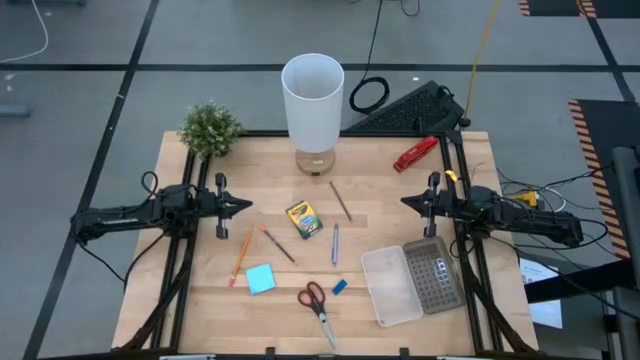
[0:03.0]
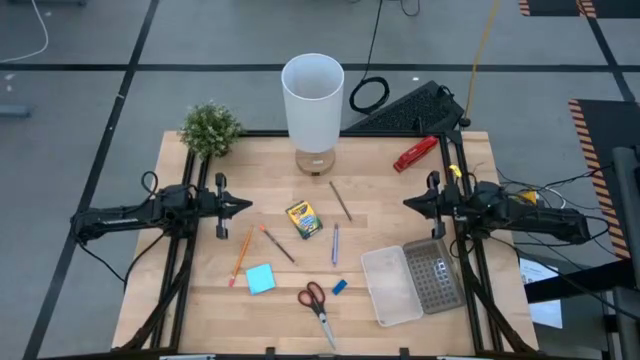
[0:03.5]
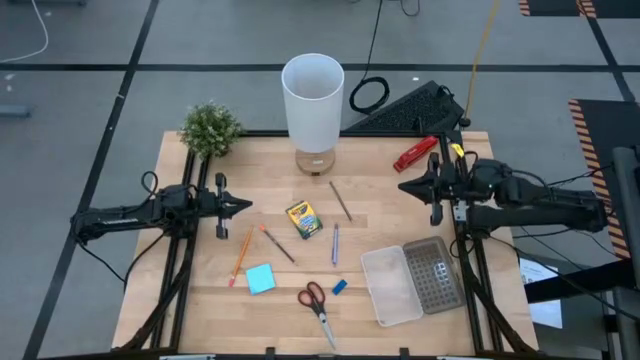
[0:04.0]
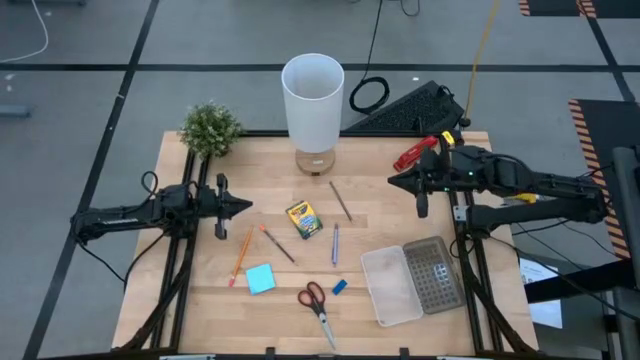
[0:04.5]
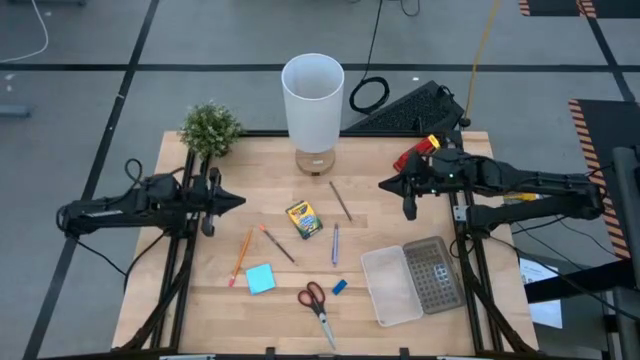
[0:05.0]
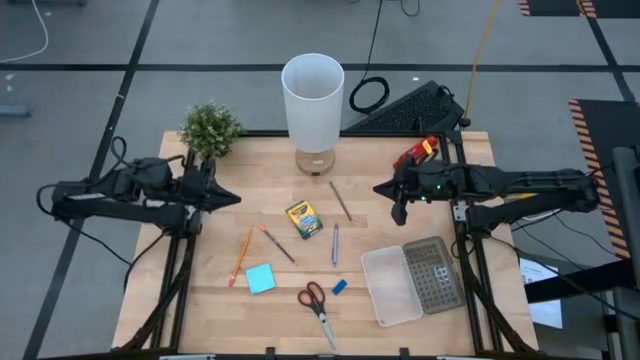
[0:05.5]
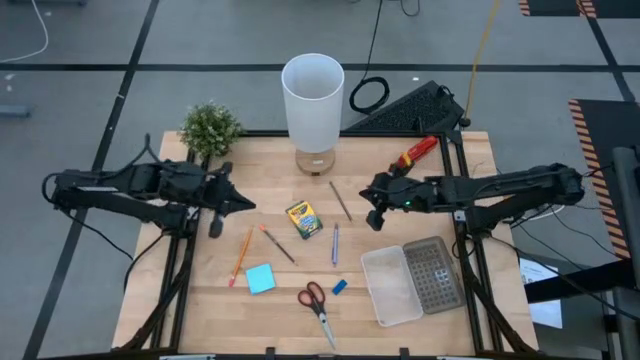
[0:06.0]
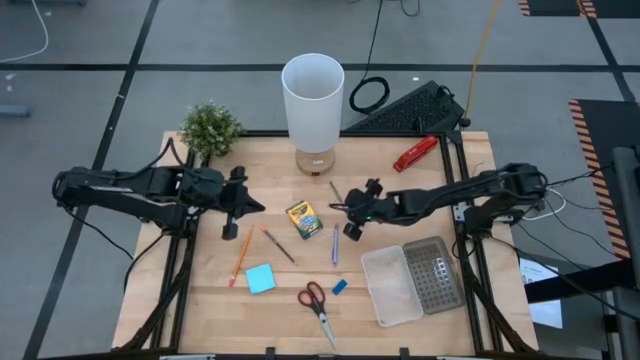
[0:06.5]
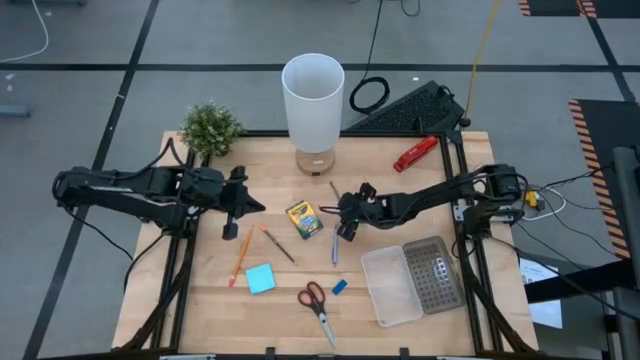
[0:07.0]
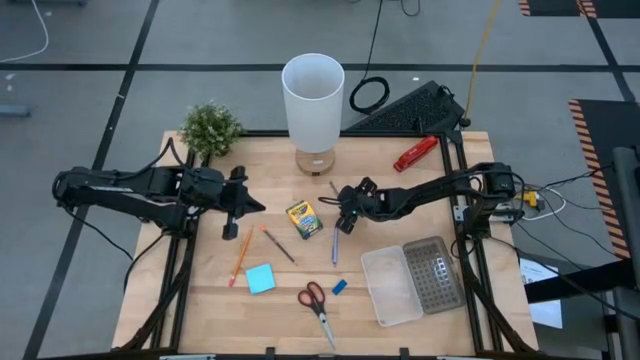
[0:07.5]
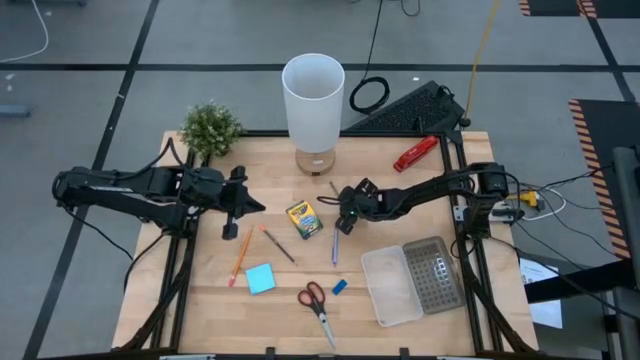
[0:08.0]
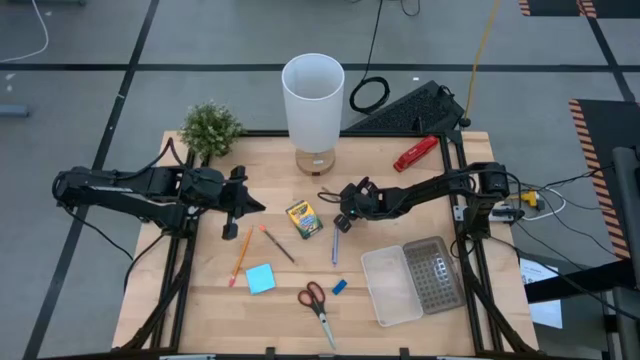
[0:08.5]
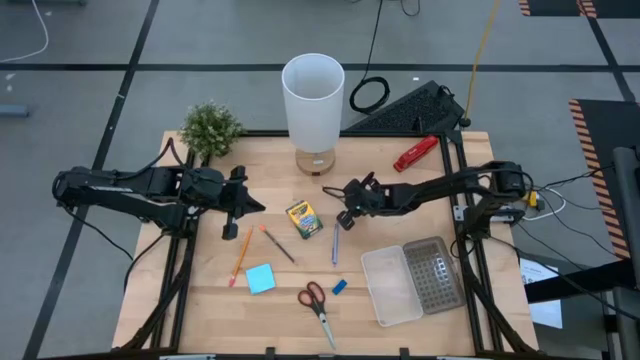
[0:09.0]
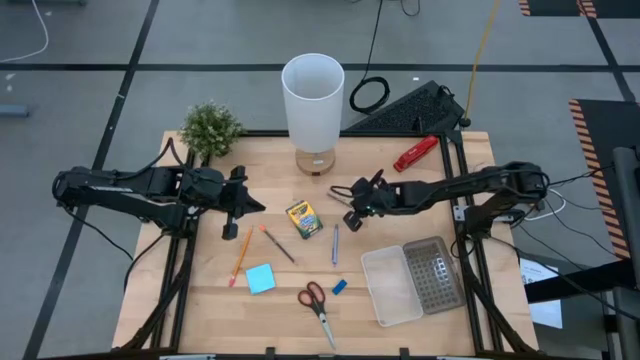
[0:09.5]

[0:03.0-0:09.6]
Task: Pack school essentials
Put the top black pencil into the supplies box

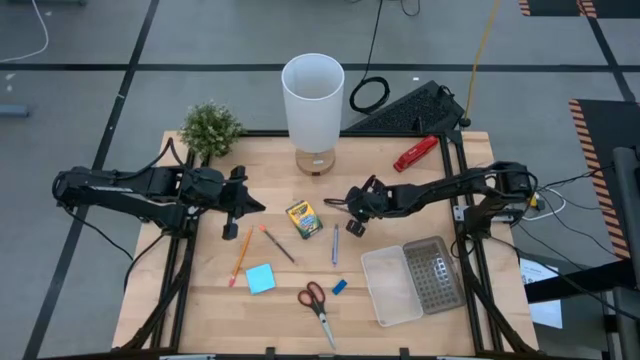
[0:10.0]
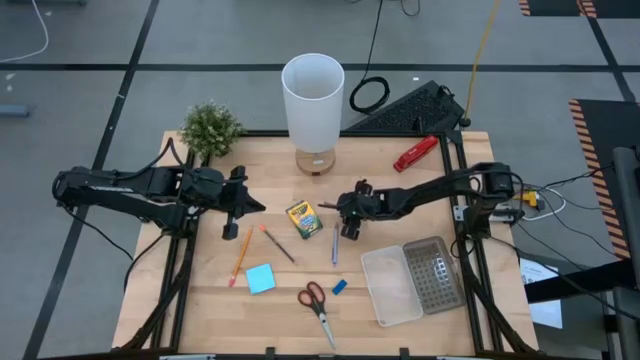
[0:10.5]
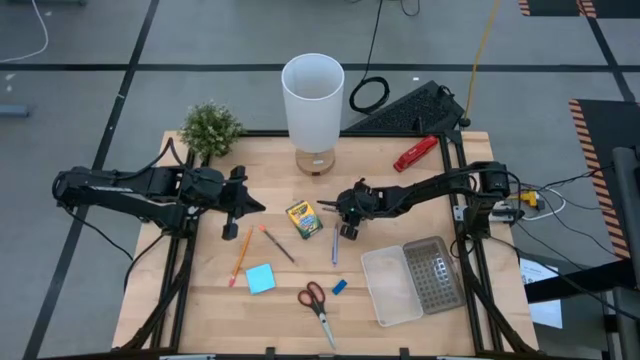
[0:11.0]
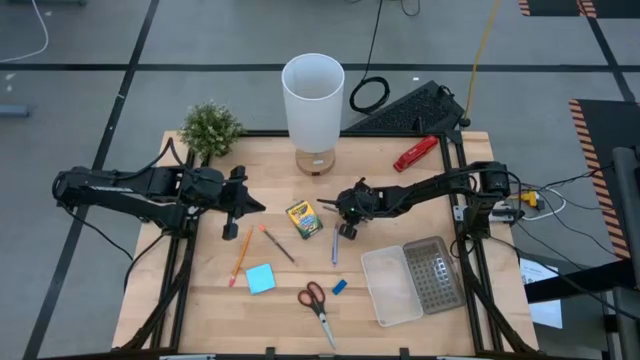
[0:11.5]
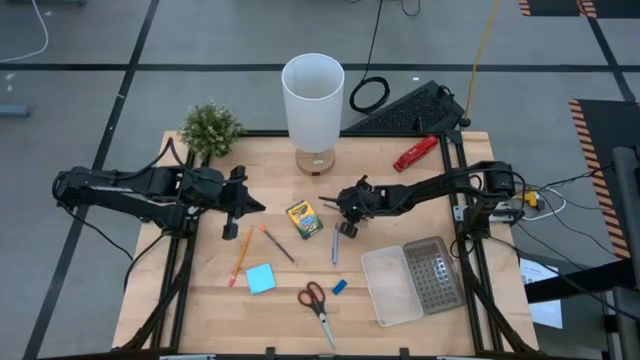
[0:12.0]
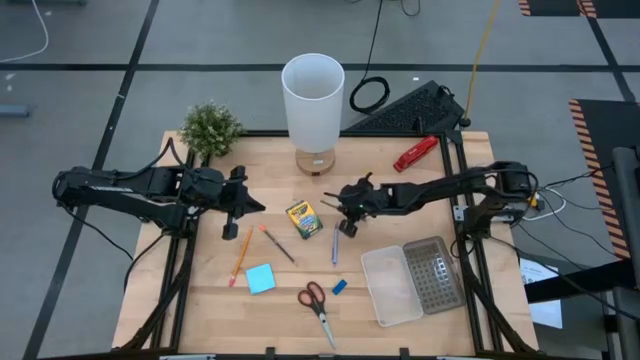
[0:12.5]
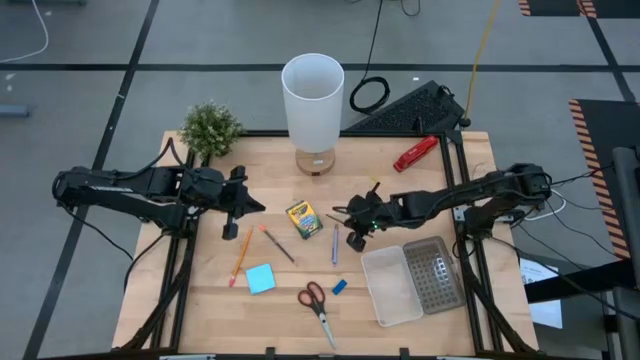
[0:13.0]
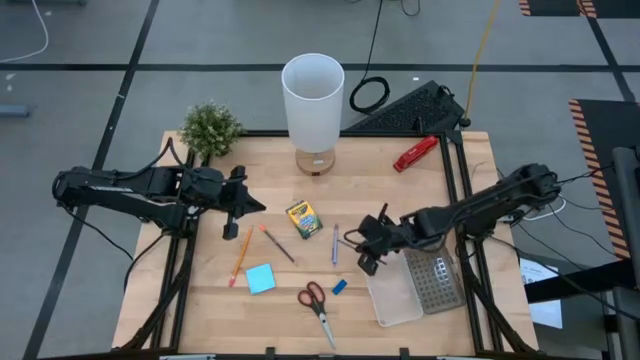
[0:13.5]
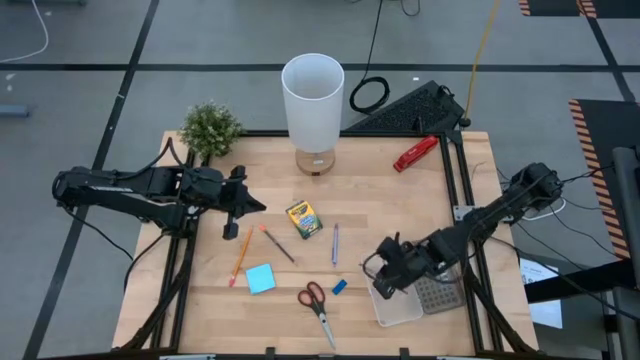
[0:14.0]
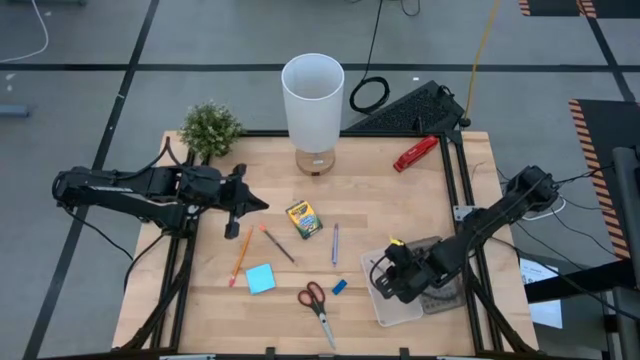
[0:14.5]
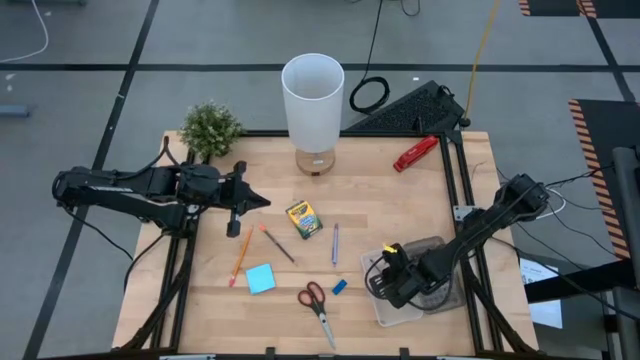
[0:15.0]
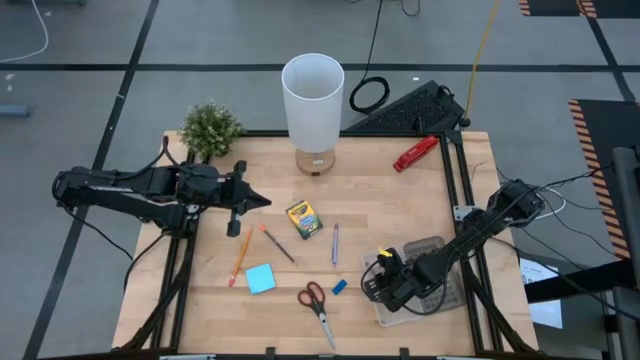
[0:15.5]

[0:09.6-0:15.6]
Put the top black pencil into the supplies box

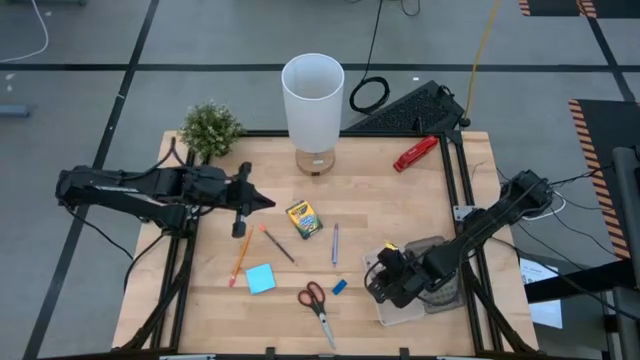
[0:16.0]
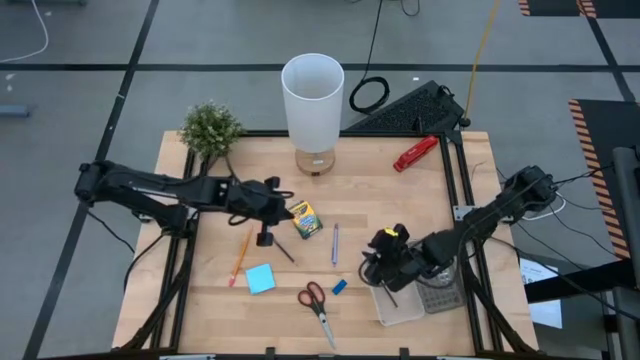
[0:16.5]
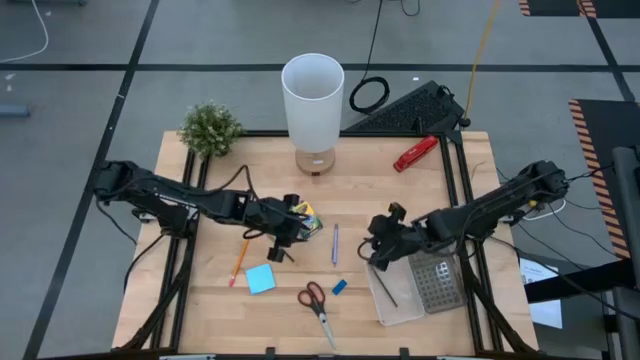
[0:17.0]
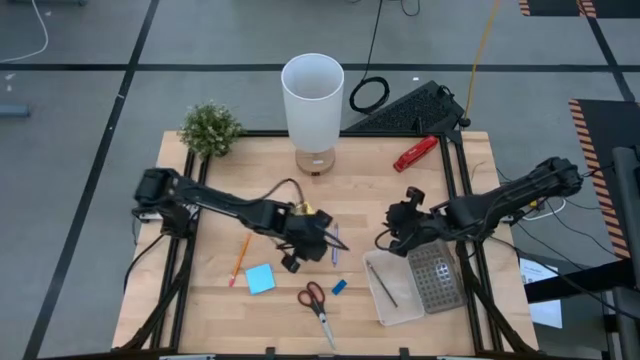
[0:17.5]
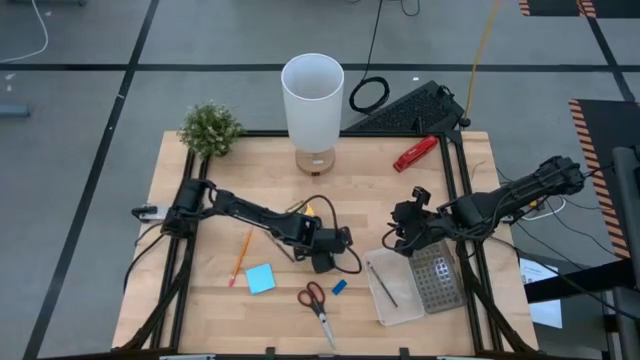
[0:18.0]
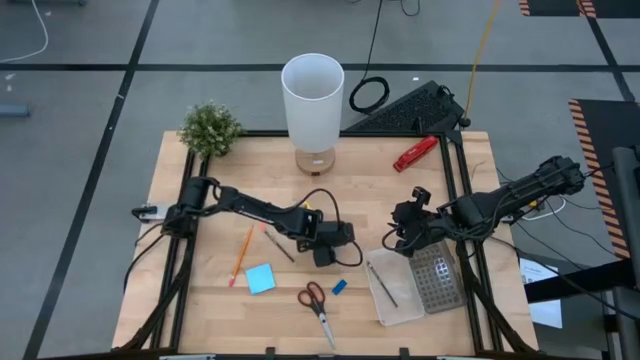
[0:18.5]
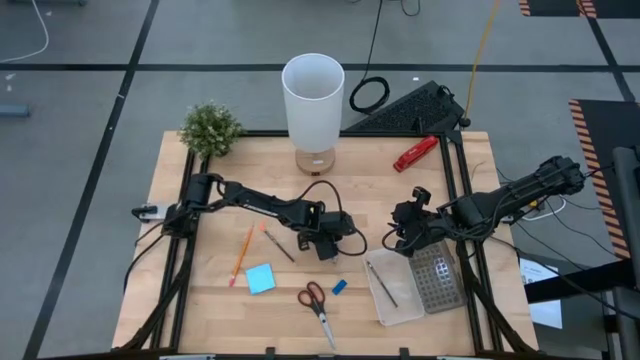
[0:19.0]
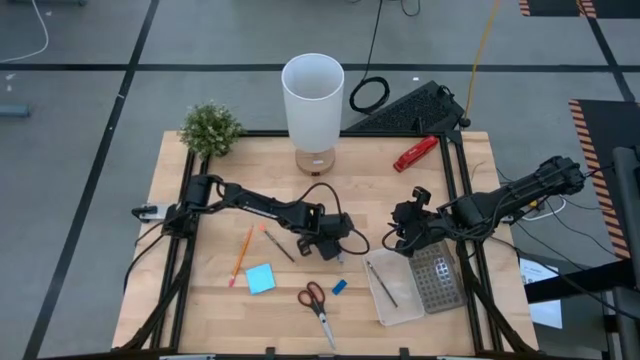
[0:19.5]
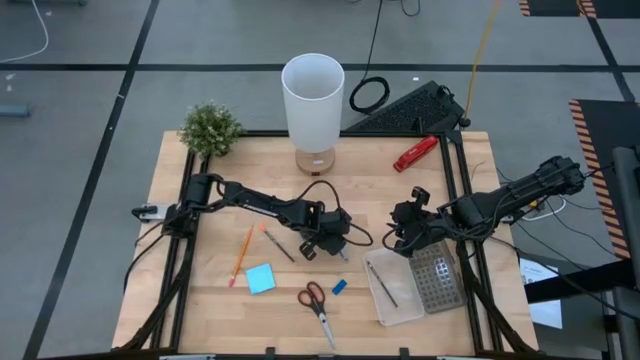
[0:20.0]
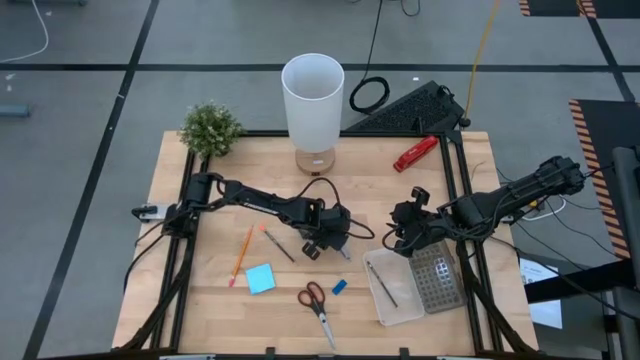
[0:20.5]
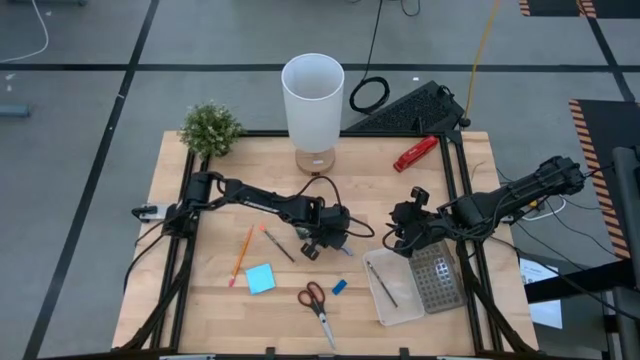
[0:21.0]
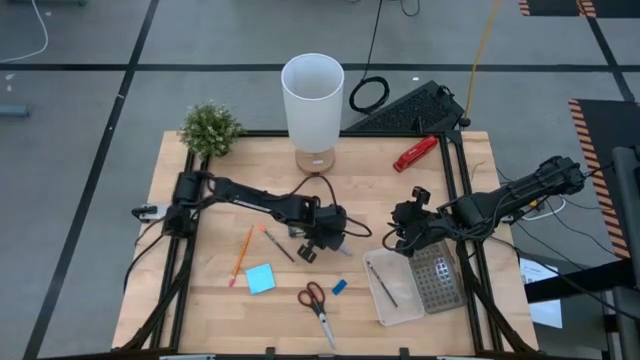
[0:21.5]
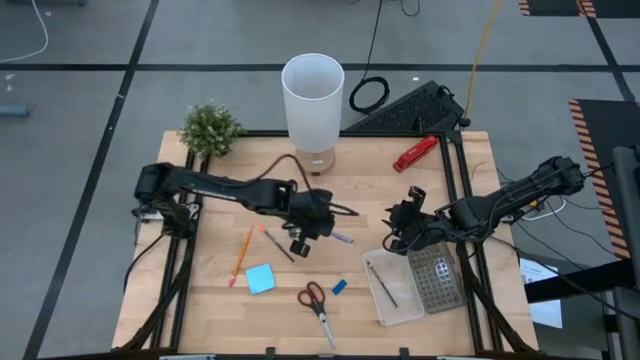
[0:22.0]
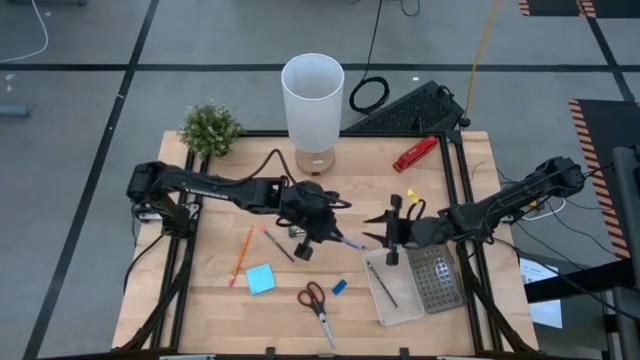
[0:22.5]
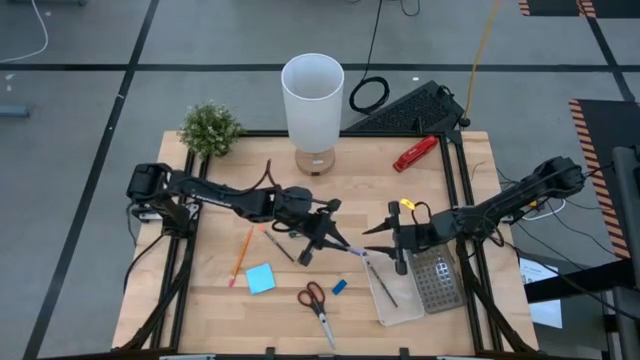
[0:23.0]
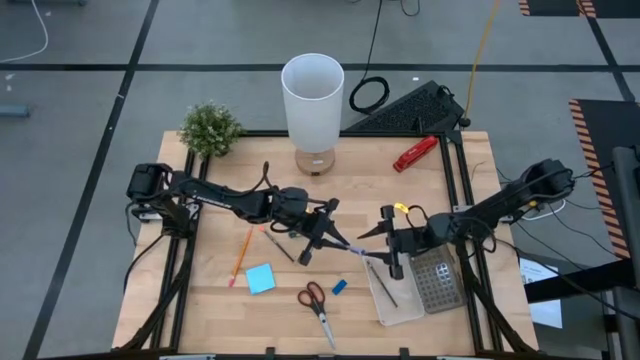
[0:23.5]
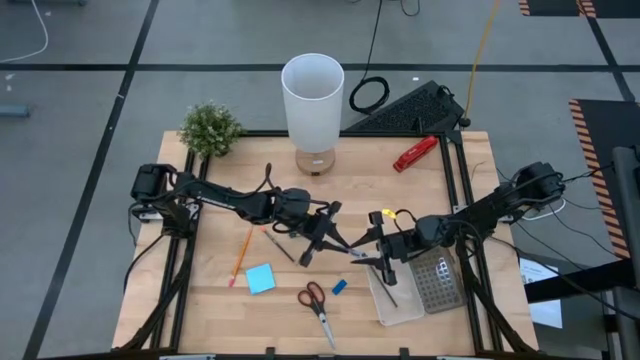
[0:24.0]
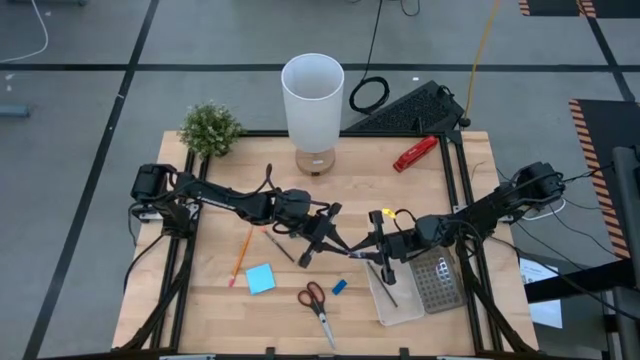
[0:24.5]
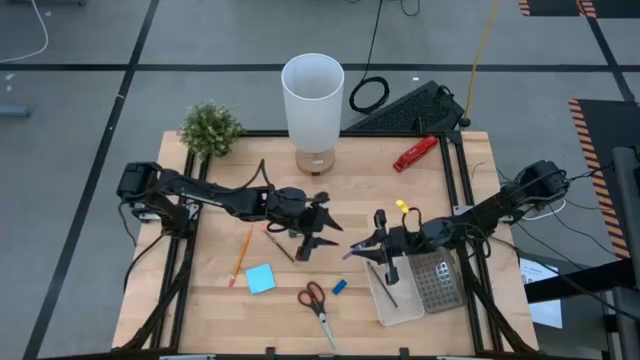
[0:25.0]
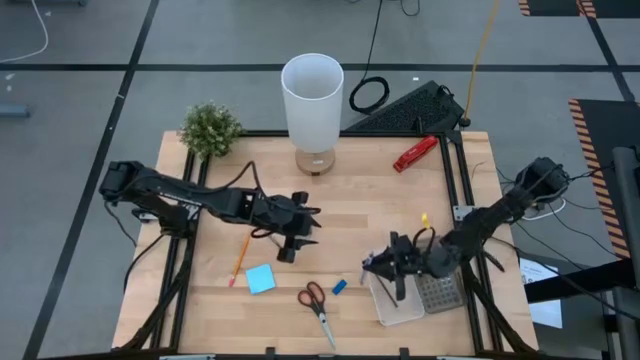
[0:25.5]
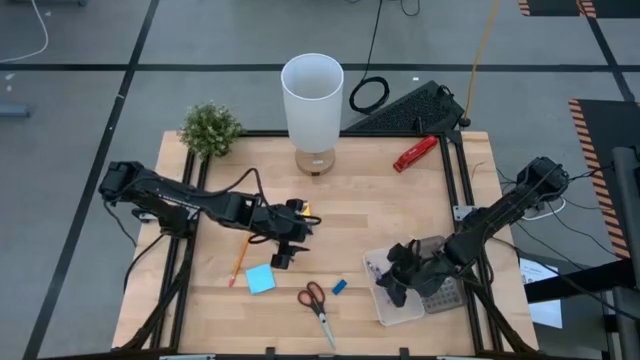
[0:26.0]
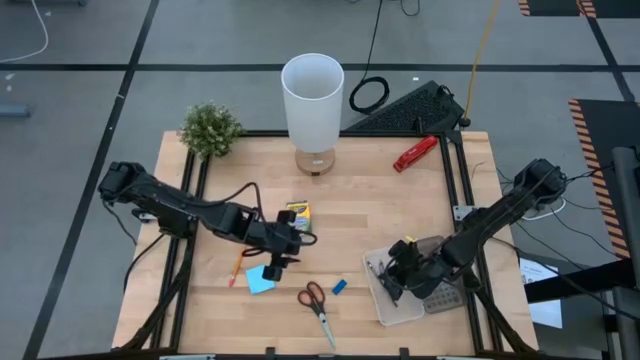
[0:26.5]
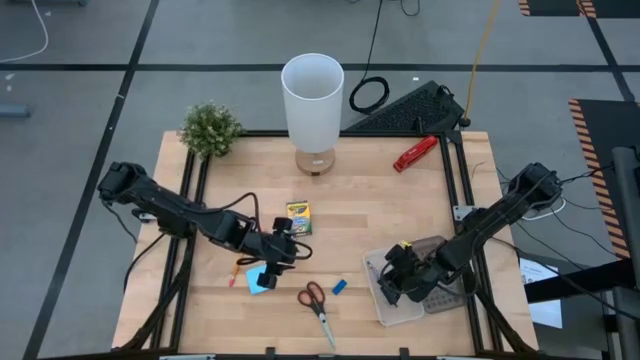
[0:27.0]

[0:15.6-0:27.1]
Put the gray pen into the supplies box
